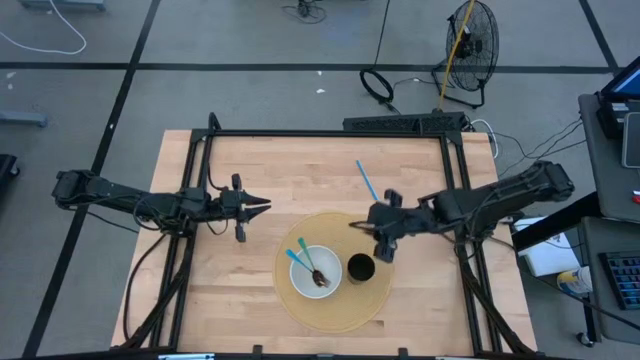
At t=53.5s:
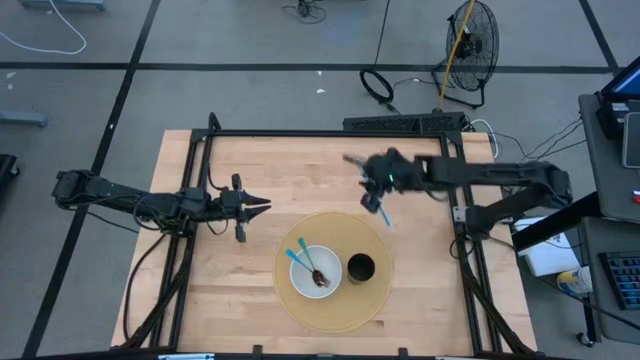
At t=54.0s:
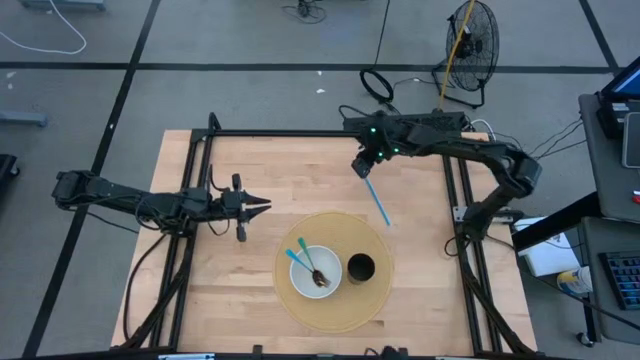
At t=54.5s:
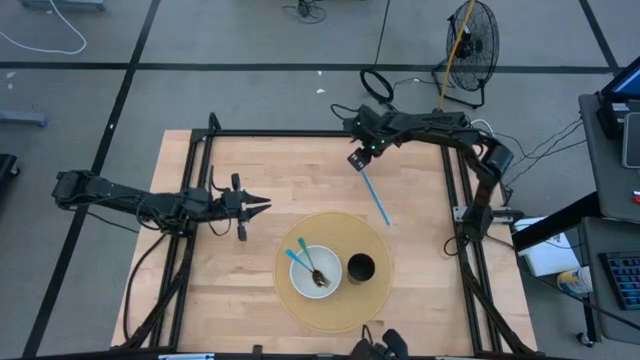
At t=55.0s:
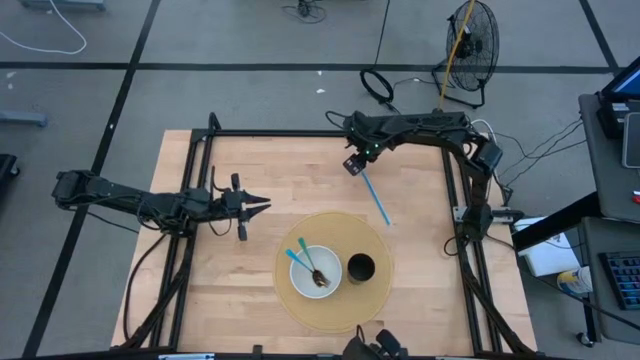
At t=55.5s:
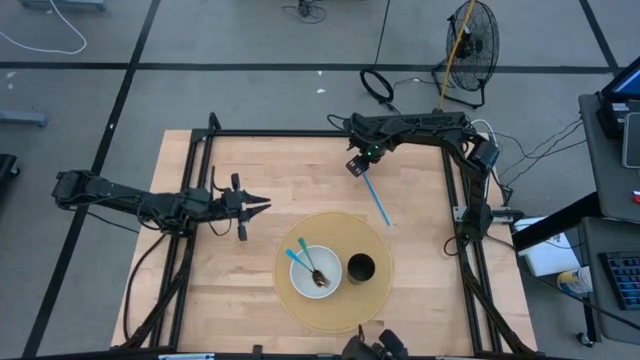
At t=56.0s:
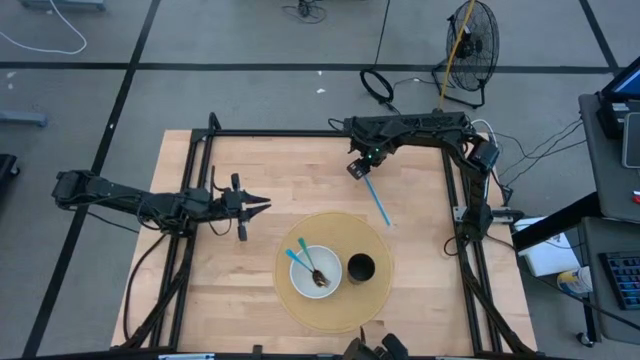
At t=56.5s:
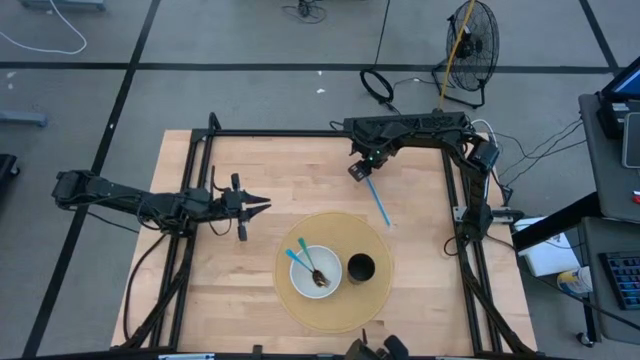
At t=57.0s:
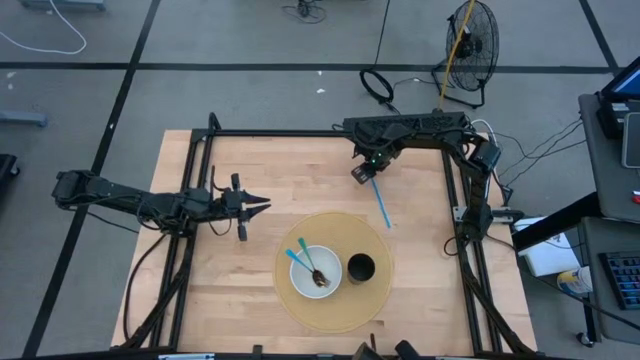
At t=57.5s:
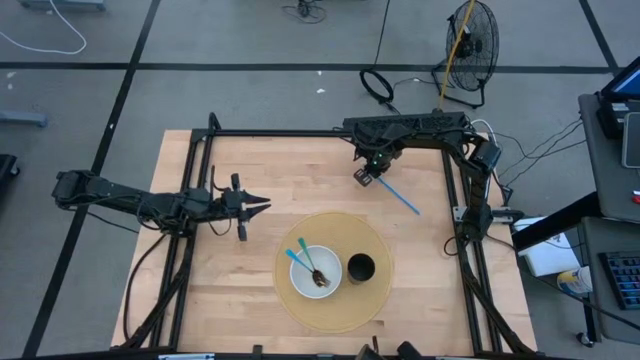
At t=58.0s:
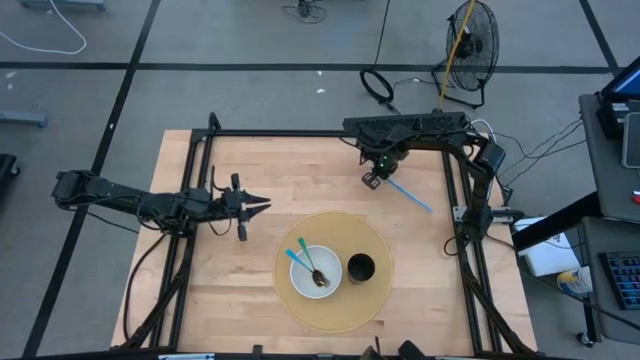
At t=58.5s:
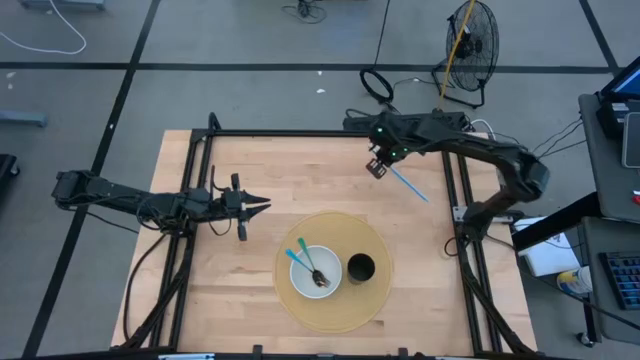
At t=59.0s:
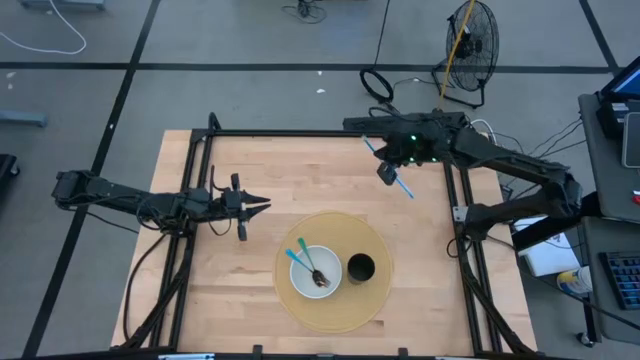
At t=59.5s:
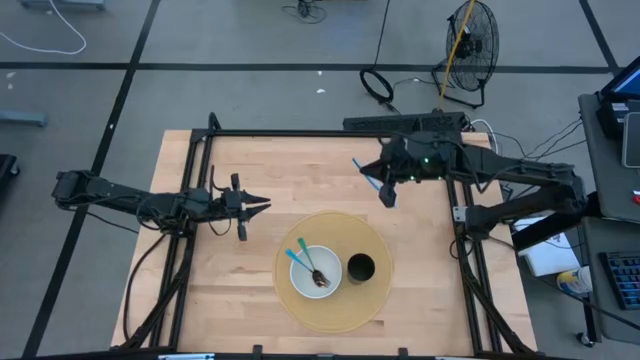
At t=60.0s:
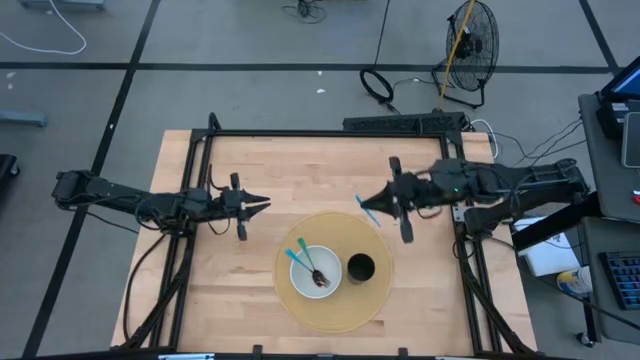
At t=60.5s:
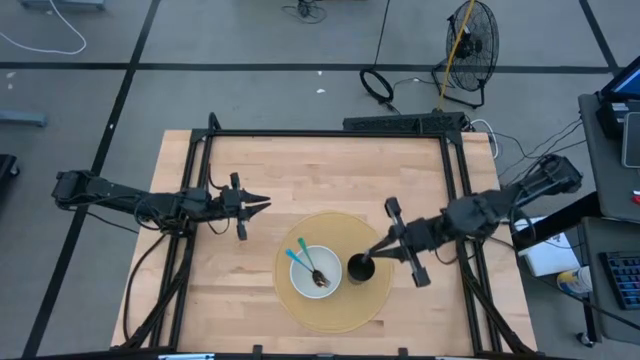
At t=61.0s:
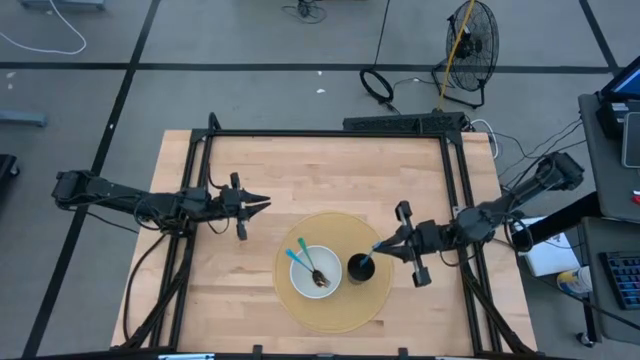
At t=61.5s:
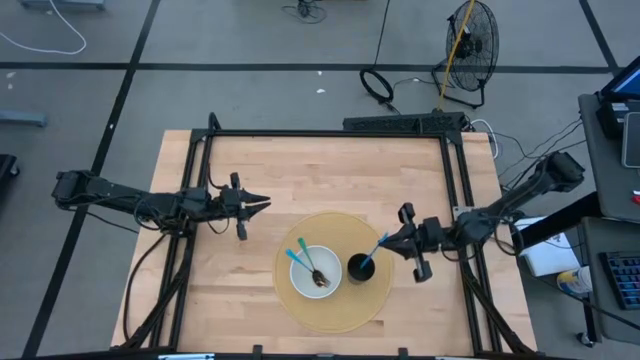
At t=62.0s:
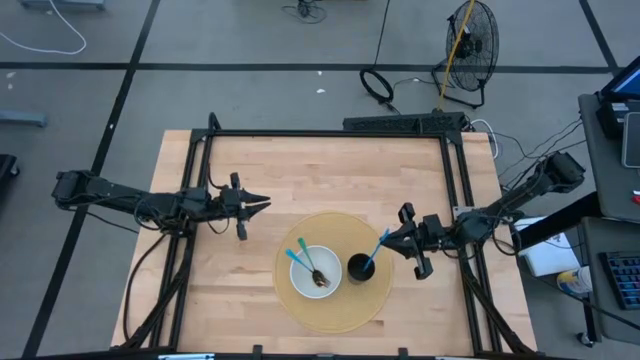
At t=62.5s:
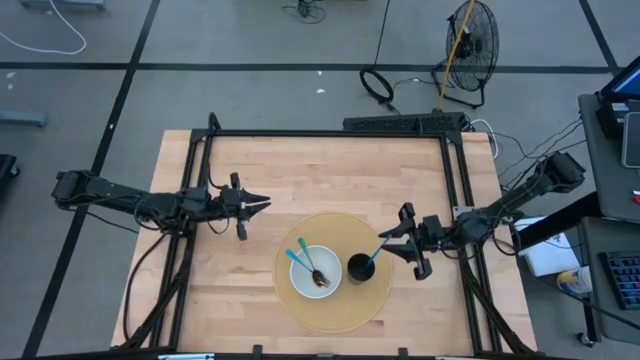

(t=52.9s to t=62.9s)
Task: Pick & Place Utensil
Put the blue straw into the black cup

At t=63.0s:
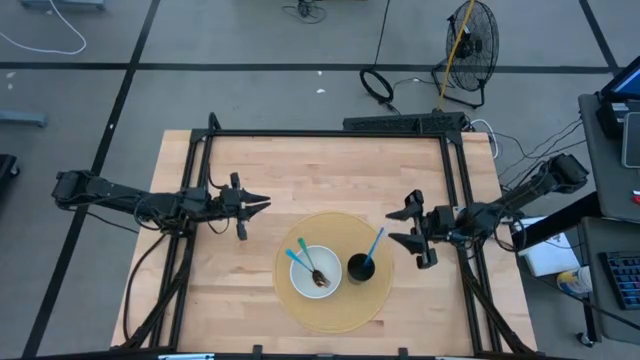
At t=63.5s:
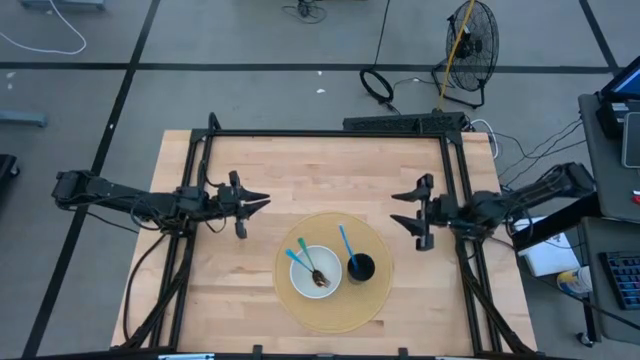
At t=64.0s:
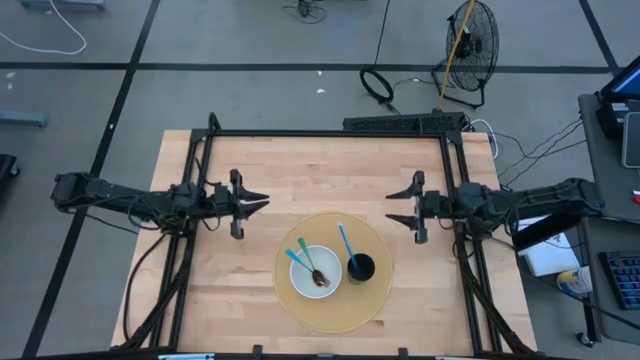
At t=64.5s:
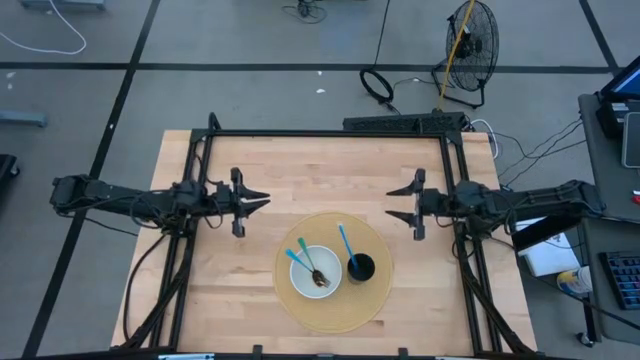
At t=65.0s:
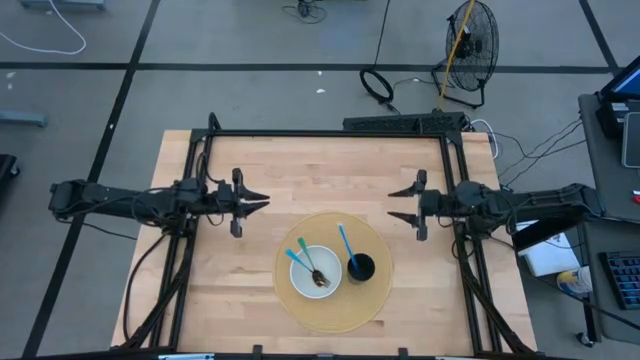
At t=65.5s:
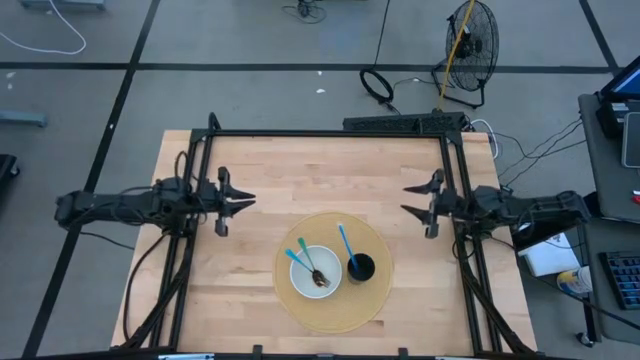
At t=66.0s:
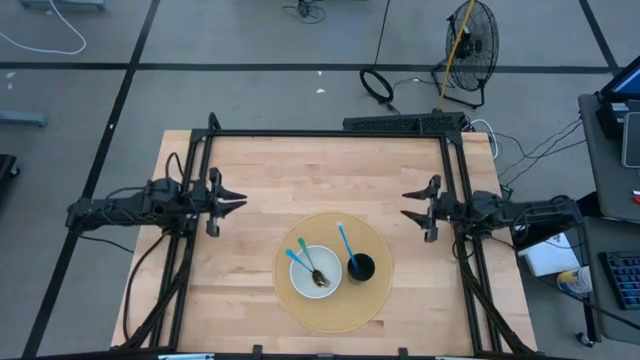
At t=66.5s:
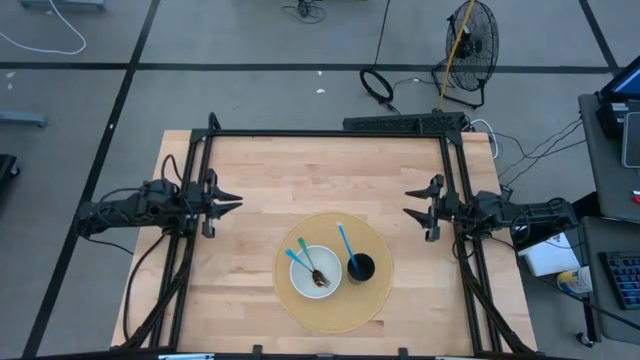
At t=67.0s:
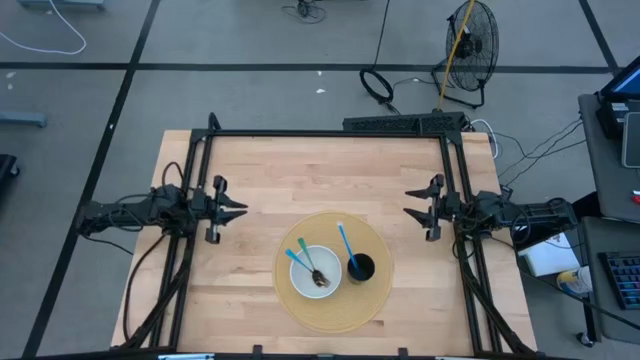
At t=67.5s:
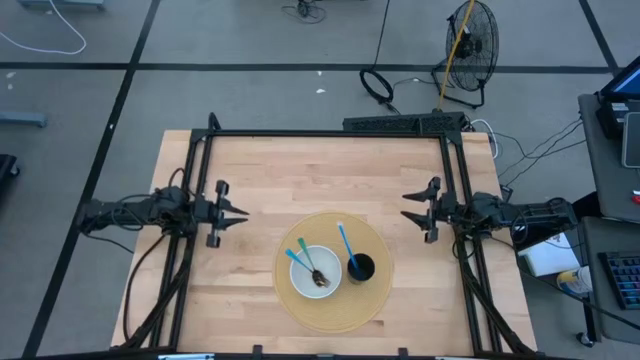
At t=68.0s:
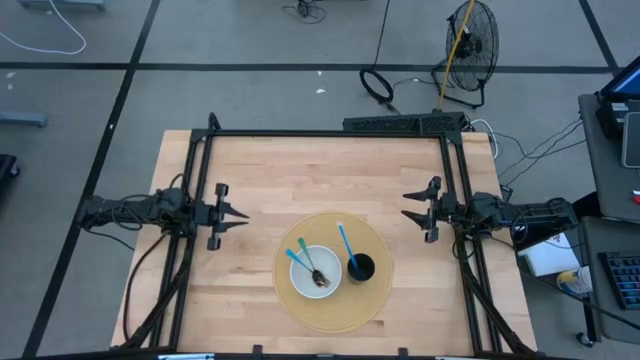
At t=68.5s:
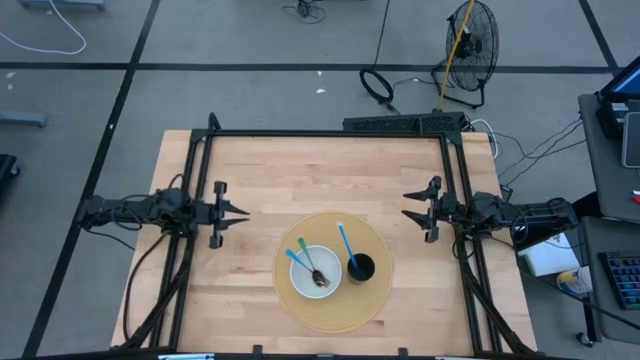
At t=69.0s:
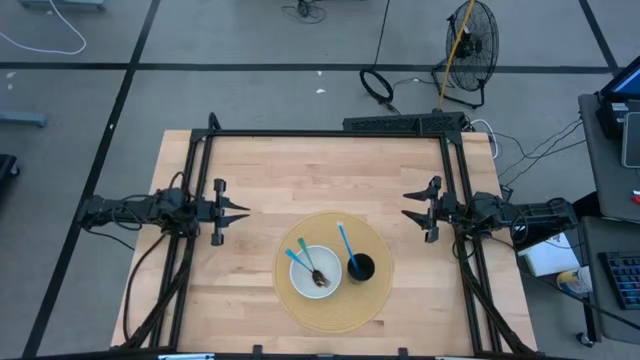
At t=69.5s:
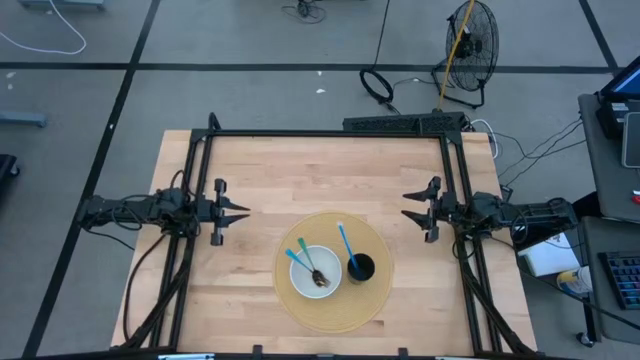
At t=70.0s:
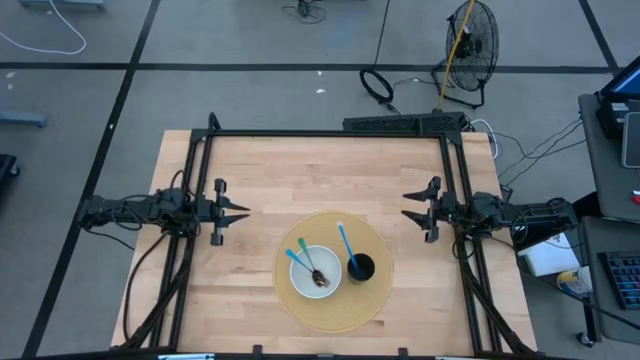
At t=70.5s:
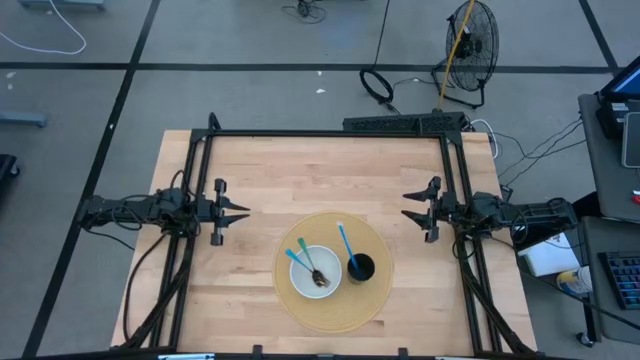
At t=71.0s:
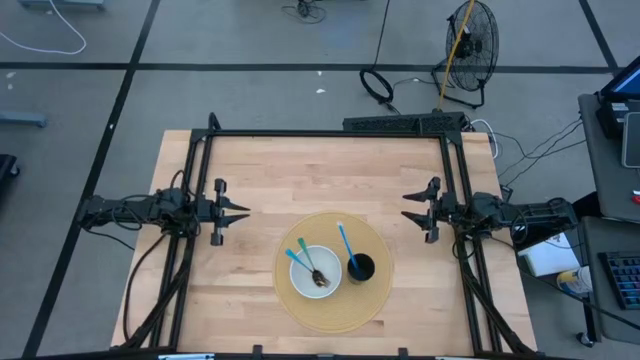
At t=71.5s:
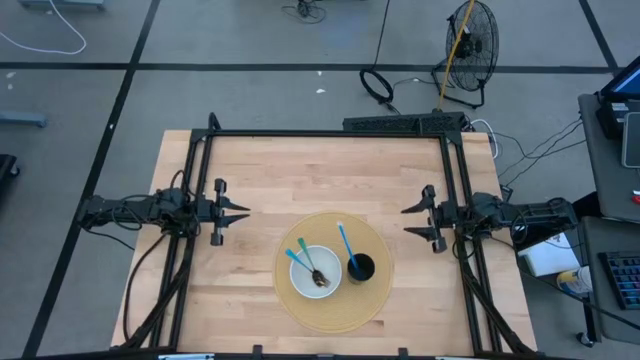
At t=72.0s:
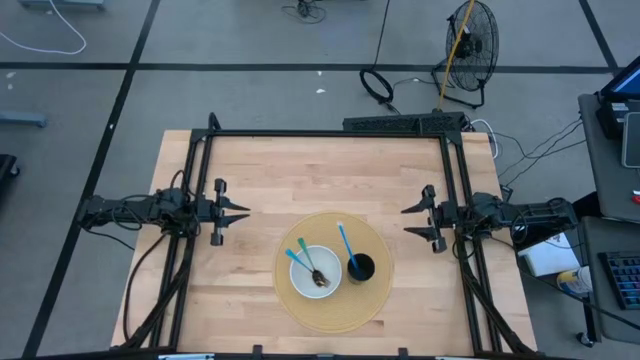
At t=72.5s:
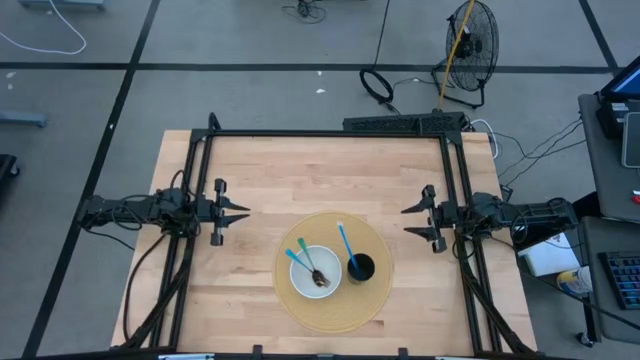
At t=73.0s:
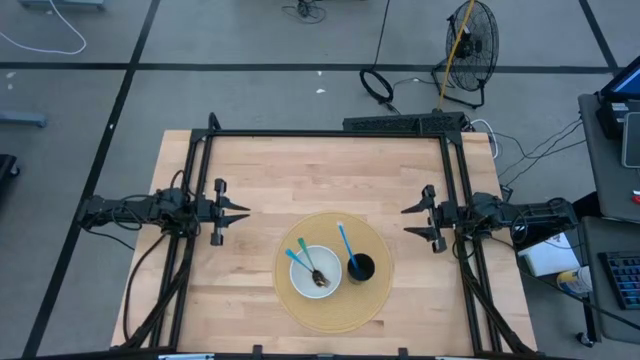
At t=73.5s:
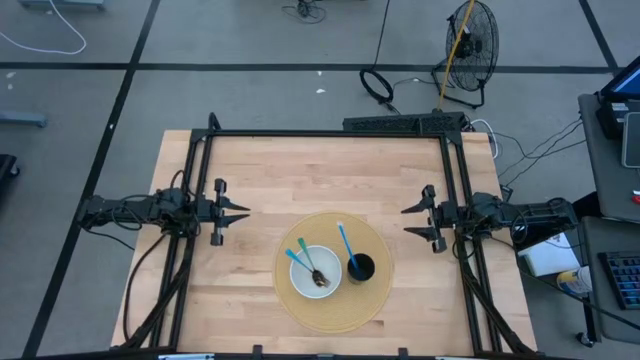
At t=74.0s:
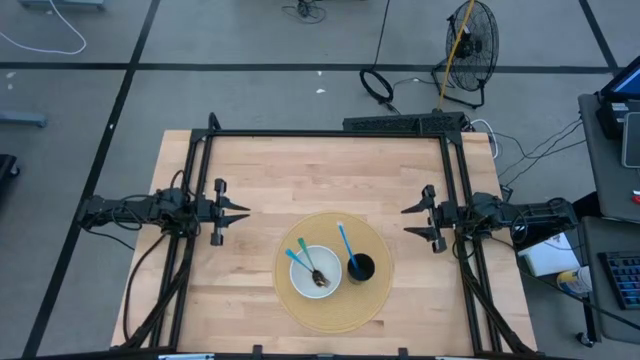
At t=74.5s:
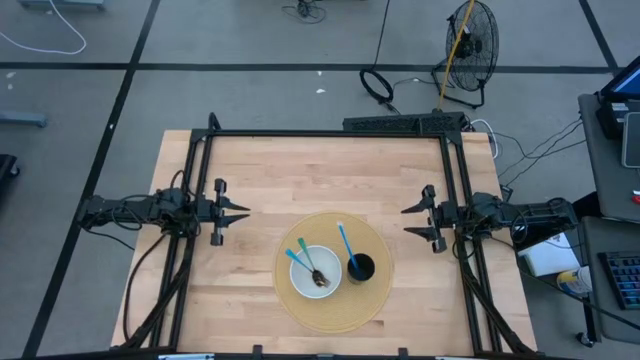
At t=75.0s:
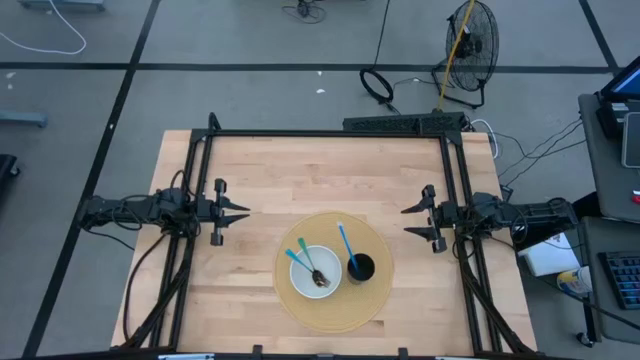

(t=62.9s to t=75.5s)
Return to Home Position

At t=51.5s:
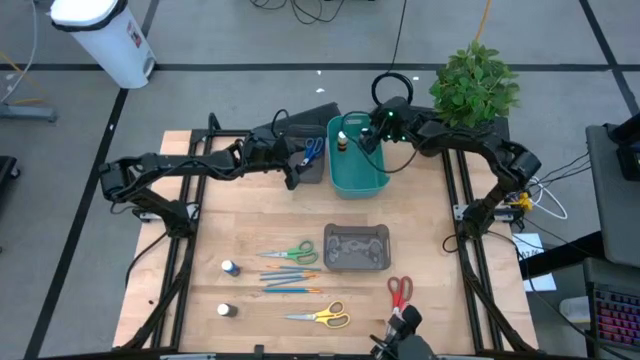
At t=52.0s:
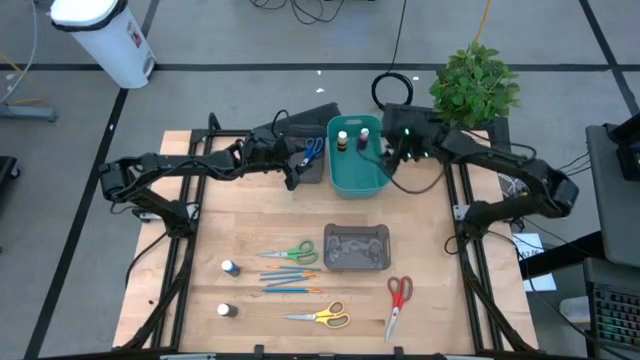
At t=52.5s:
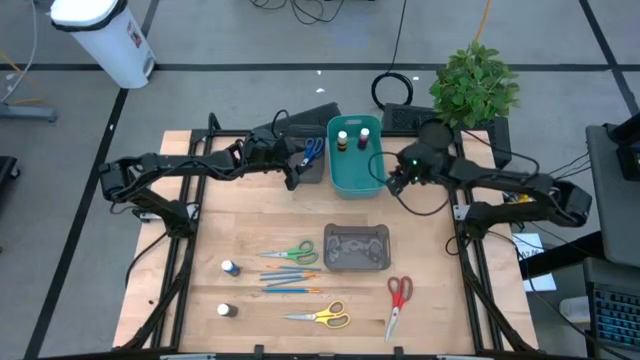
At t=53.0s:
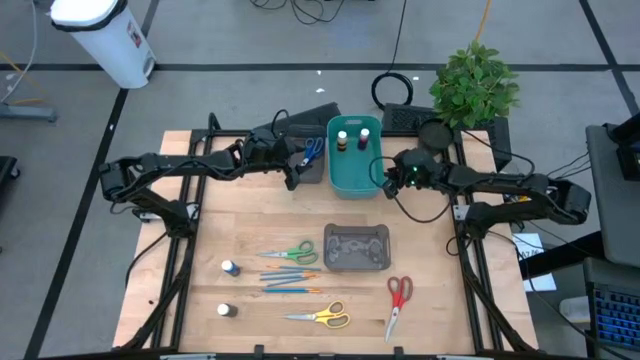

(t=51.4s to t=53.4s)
Task: Pick & Place Paint Supplies
Adjust the green bin
